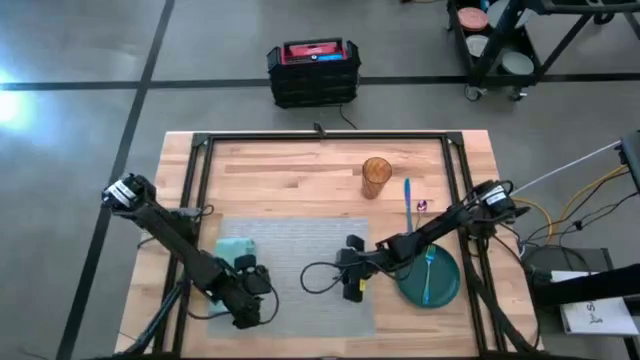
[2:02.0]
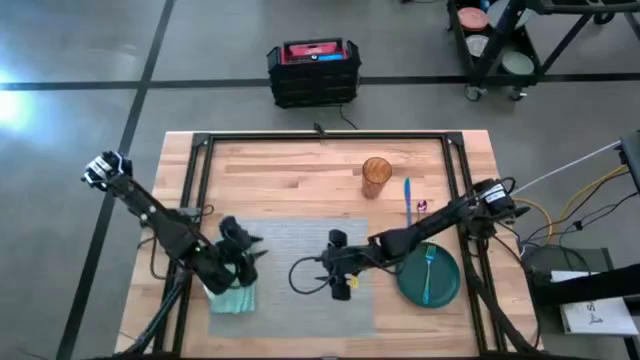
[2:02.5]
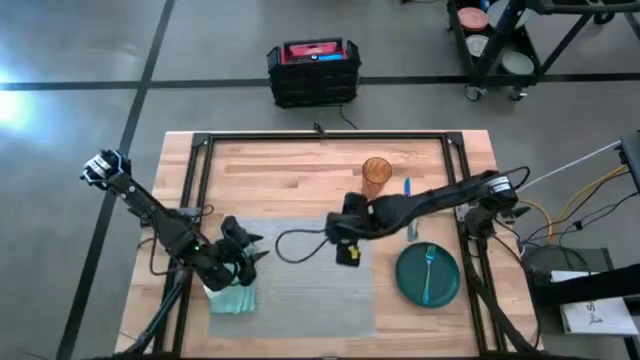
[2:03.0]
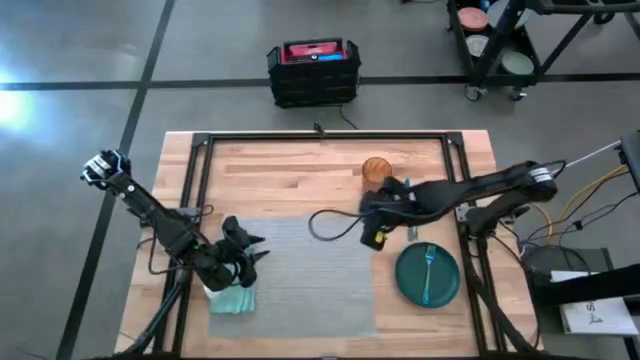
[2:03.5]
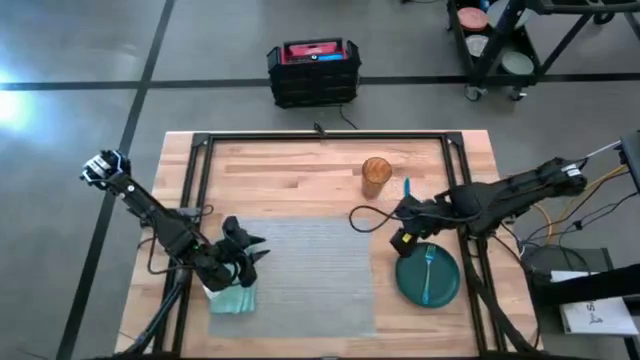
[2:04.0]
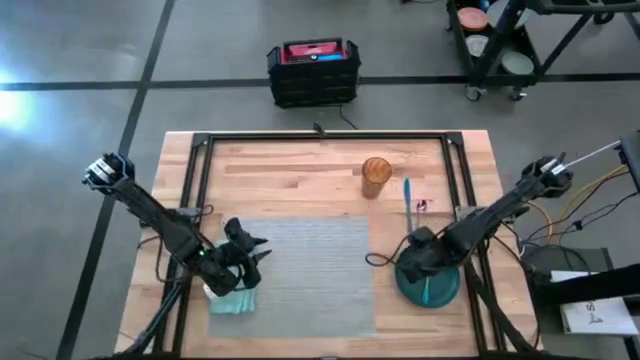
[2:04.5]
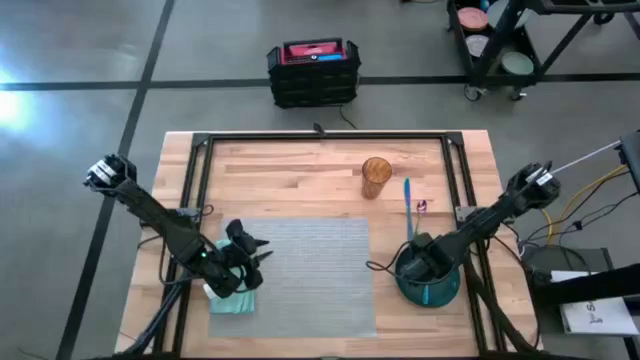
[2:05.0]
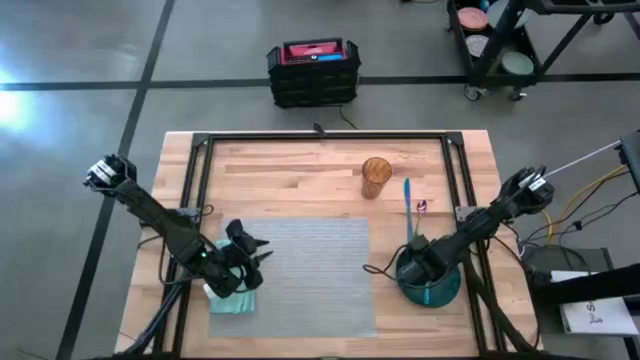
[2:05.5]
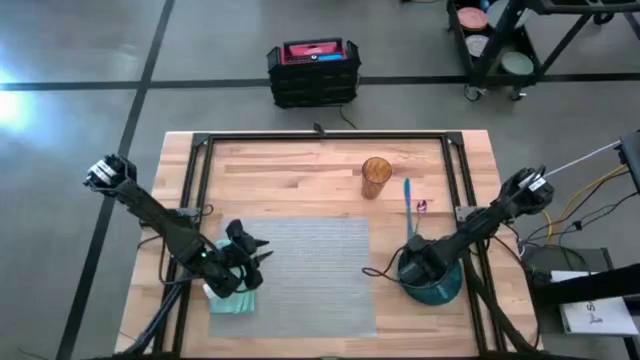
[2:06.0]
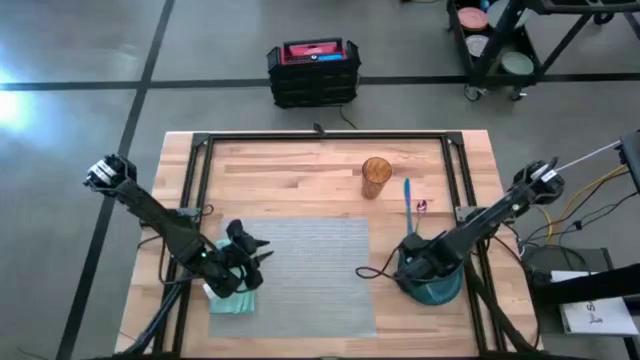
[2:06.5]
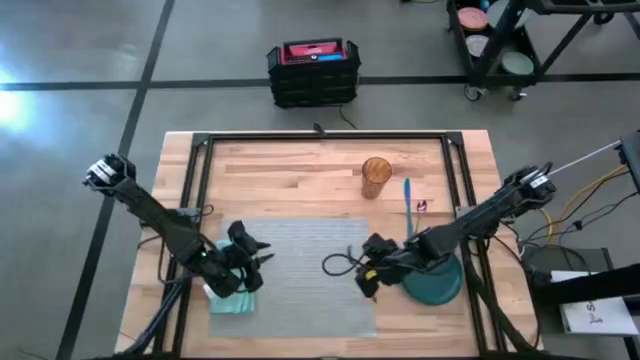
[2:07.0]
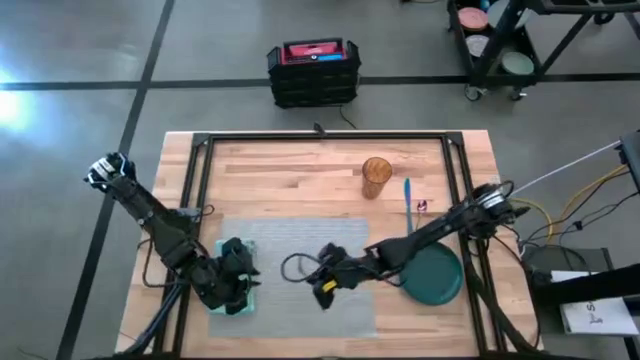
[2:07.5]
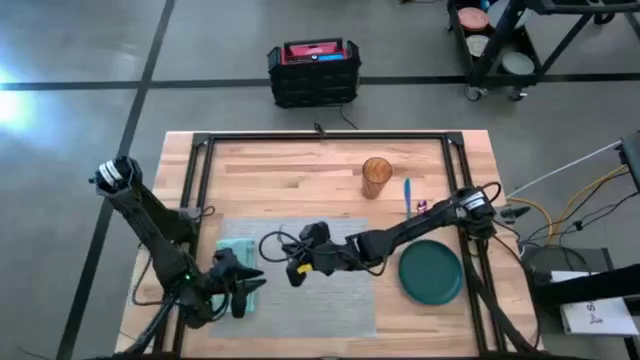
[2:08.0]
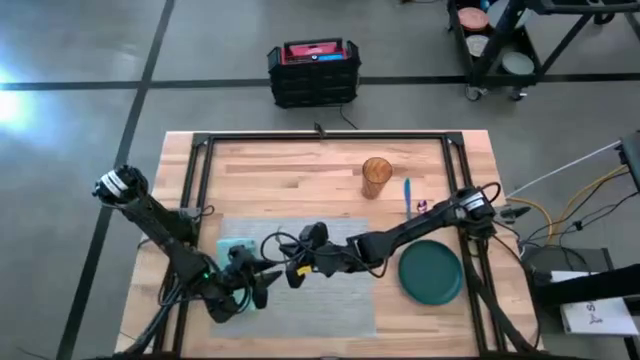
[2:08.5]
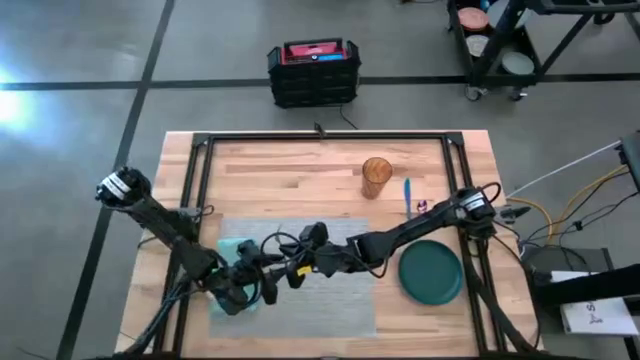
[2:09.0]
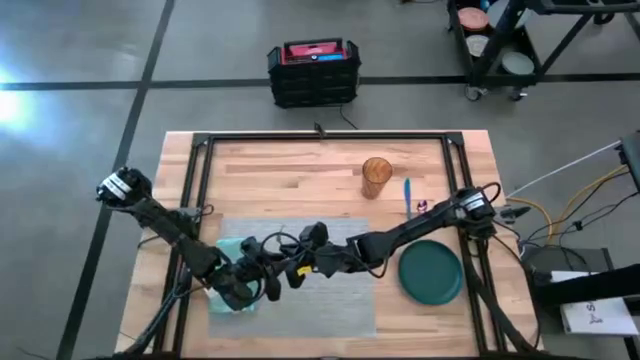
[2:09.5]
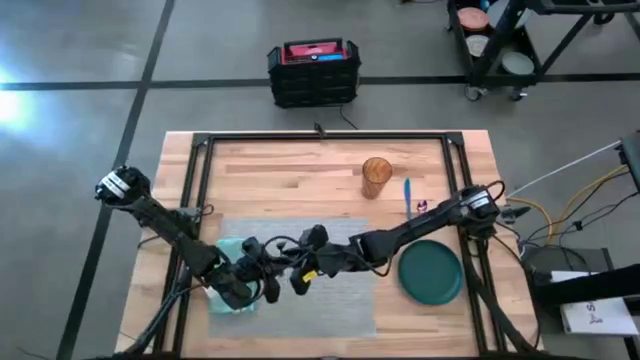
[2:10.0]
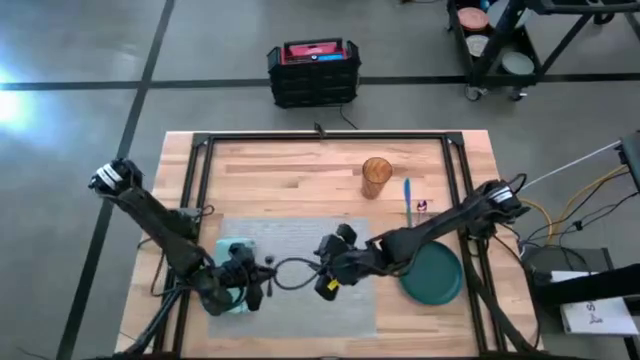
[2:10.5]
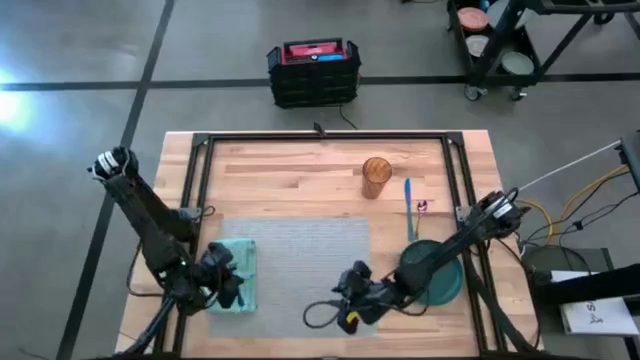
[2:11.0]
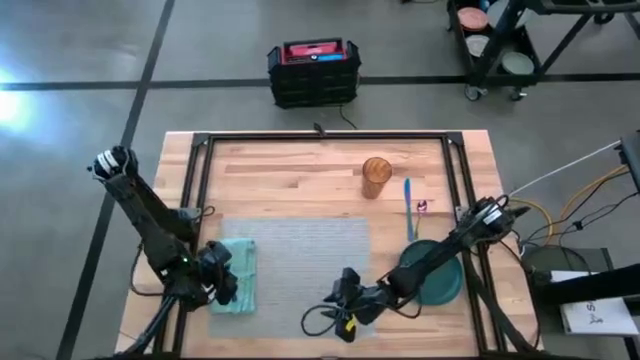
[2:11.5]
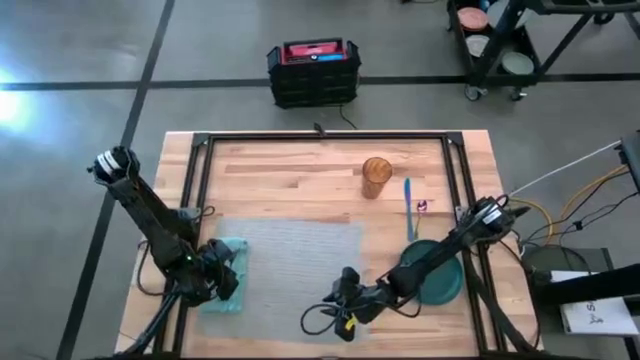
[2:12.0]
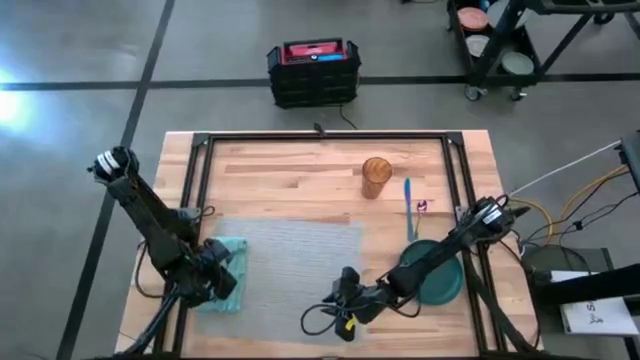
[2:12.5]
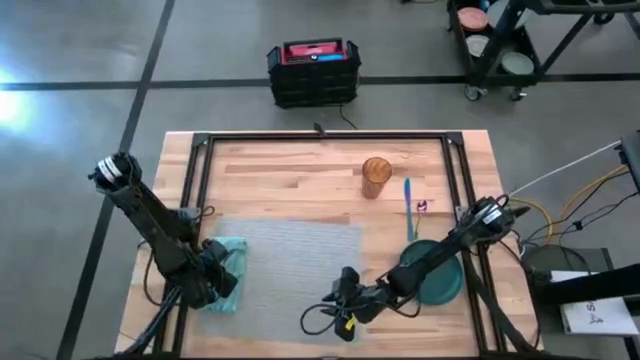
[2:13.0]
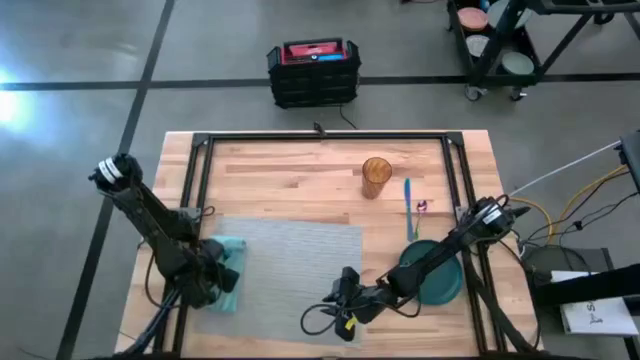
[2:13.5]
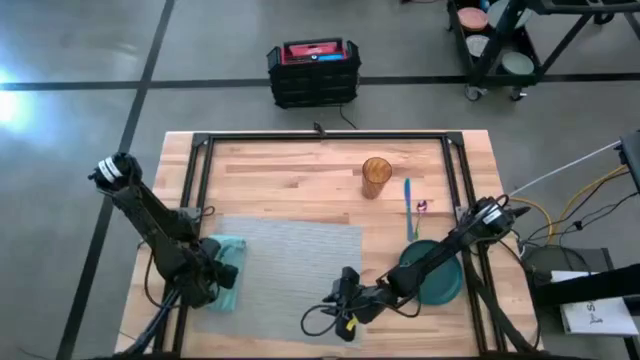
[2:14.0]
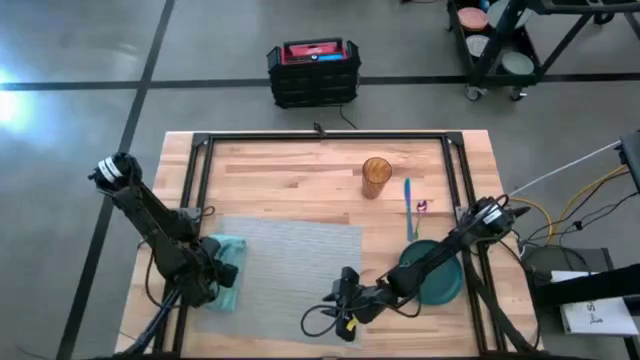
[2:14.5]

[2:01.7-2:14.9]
Task: Set table place
Put the table fork on top of the blue table napkin on the table mat

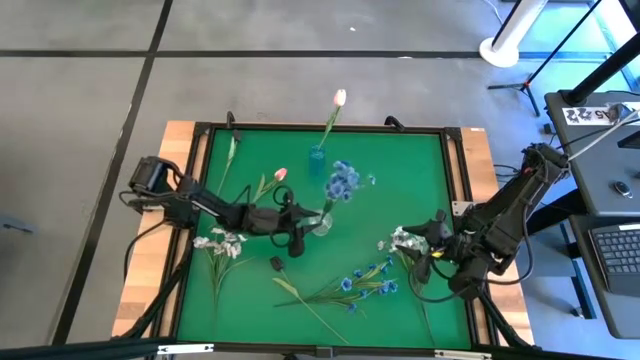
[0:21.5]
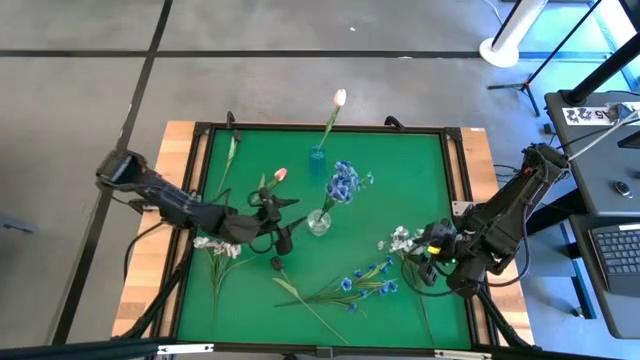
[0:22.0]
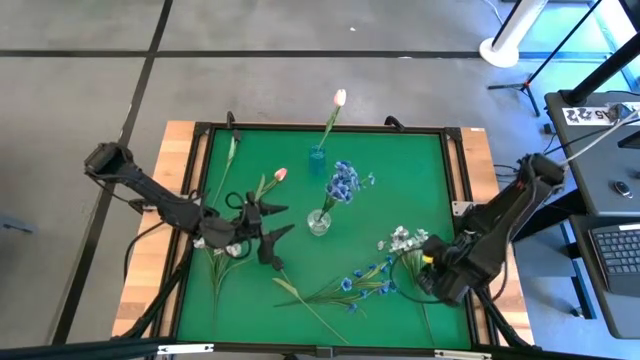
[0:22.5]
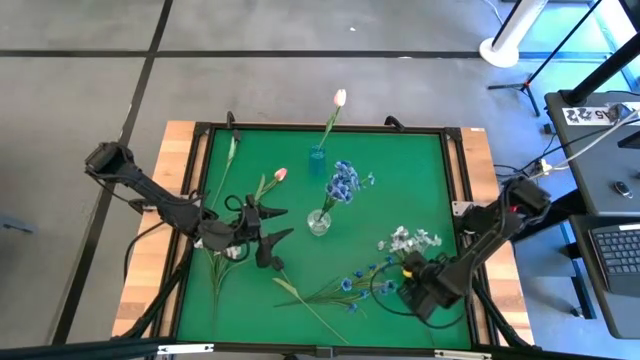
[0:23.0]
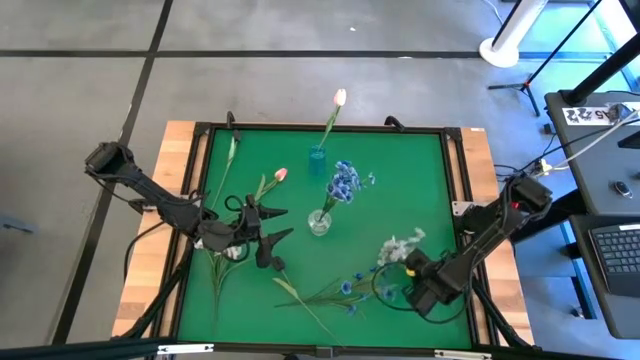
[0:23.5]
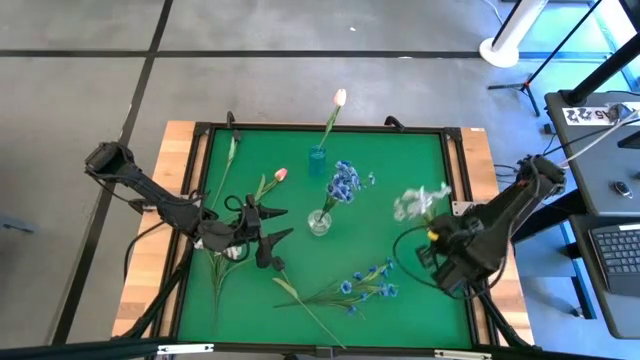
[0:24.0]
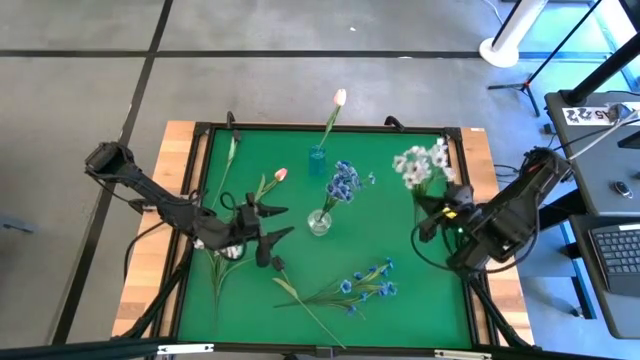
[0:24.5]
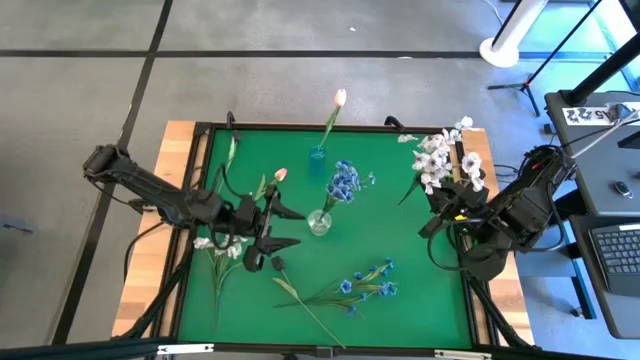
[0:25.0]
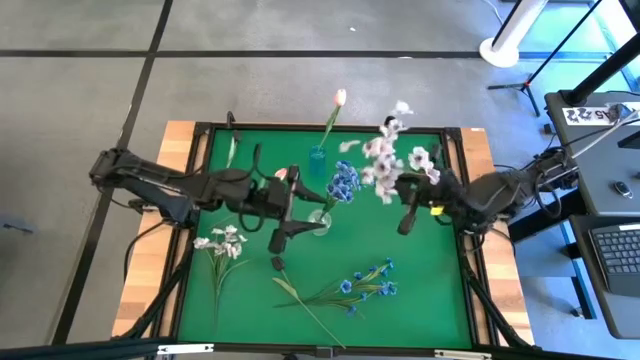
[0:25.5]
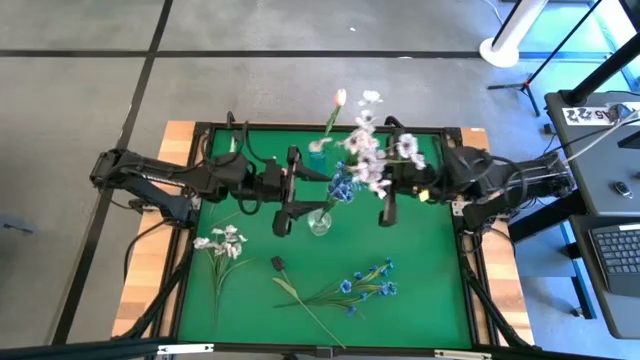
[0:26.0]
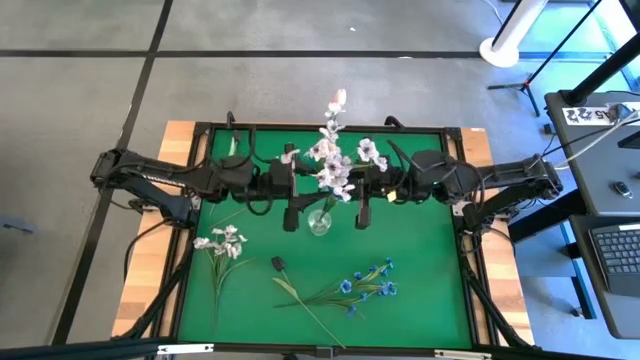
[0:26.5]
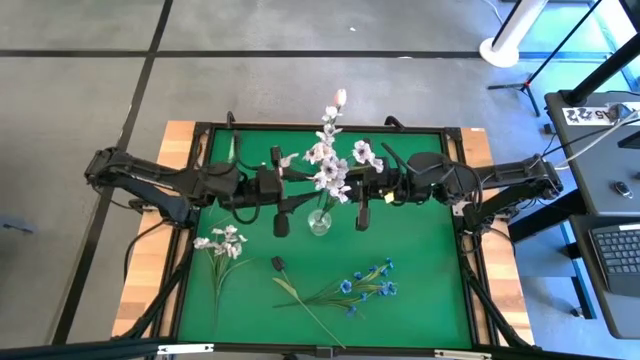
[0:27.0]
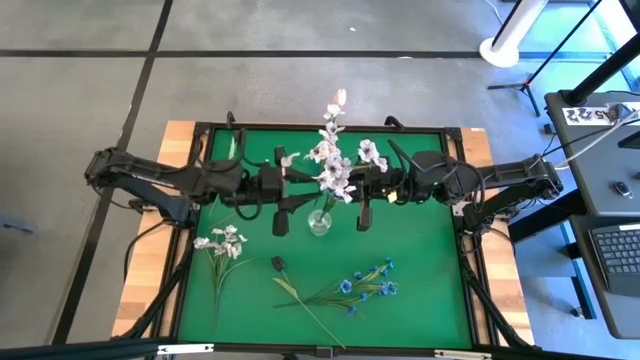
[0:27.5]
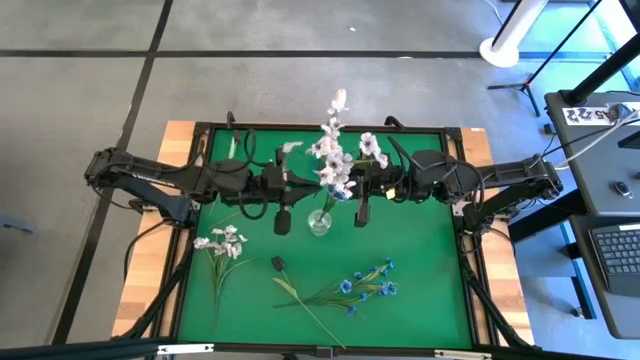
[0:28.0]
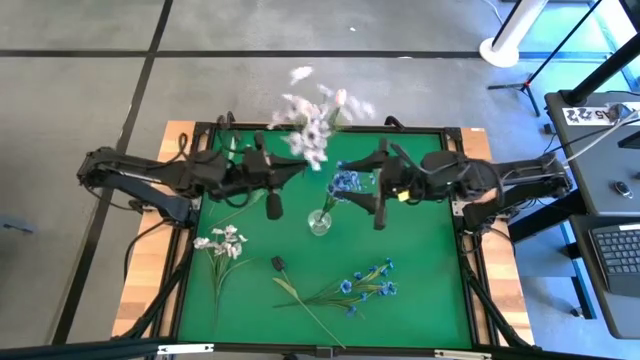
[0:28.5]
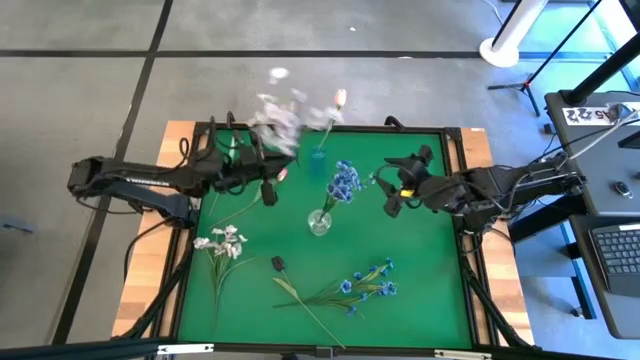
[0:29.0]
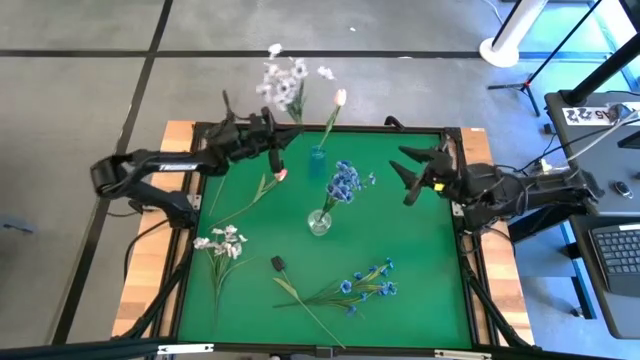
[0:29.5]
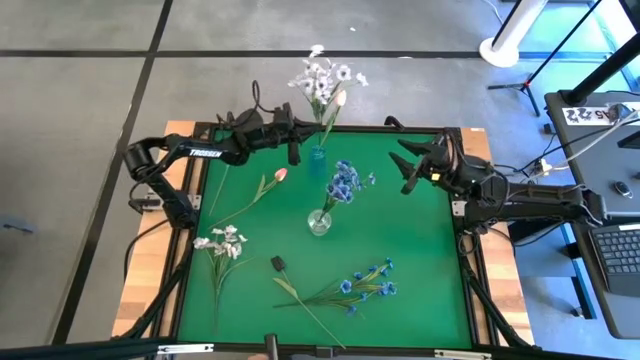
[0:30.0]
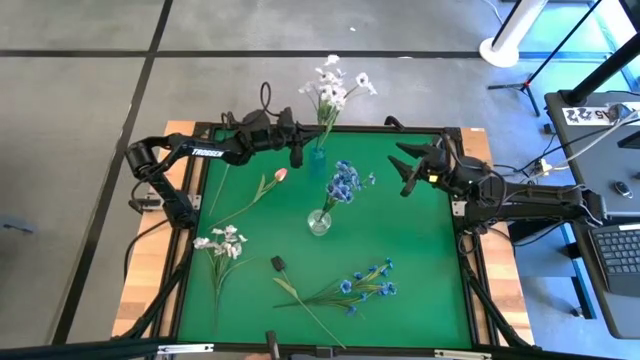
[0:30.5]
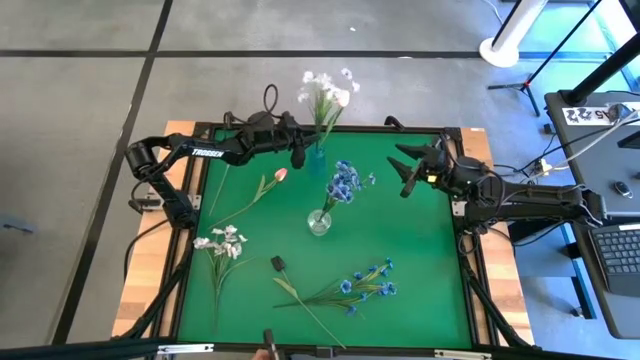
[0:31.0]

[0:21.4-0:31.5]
Task: Sort flowers into vase by color
Put the right white flowers into the blue vase
